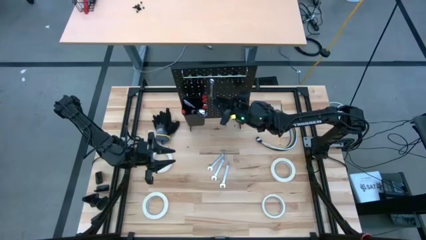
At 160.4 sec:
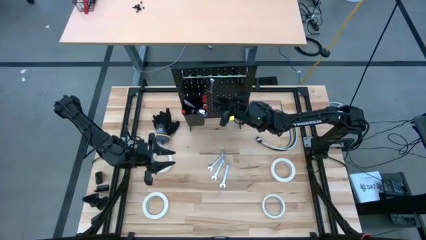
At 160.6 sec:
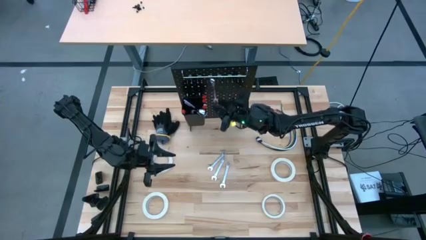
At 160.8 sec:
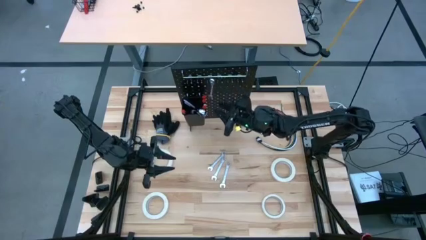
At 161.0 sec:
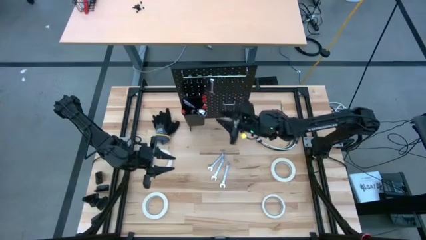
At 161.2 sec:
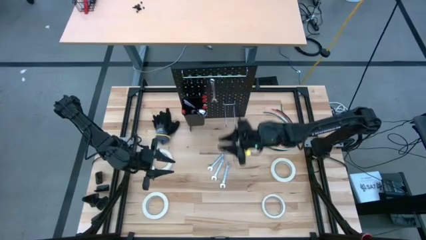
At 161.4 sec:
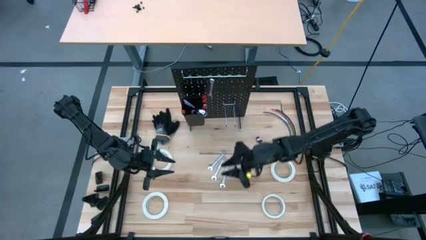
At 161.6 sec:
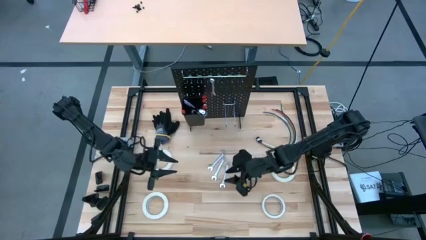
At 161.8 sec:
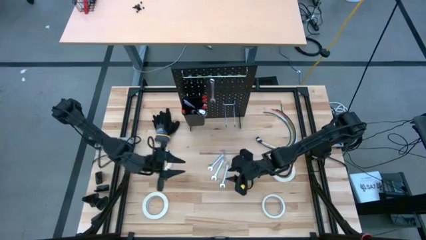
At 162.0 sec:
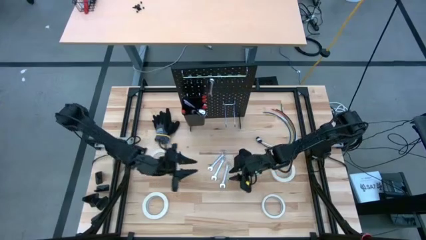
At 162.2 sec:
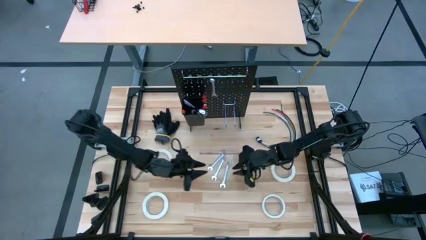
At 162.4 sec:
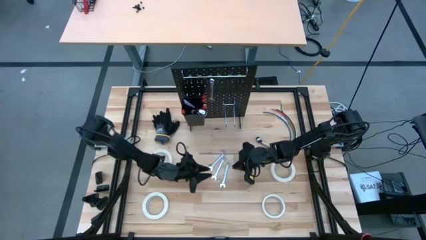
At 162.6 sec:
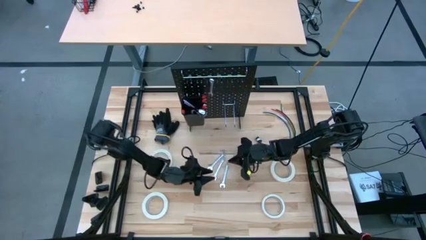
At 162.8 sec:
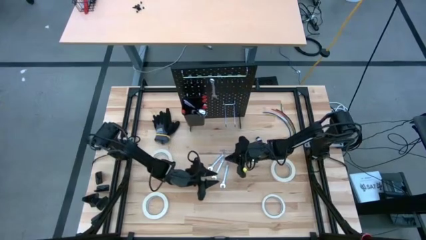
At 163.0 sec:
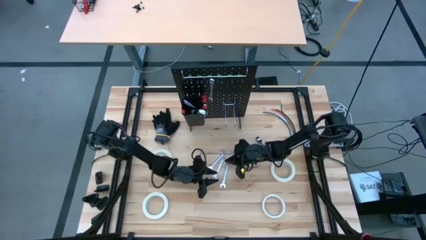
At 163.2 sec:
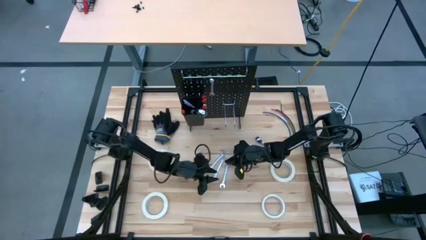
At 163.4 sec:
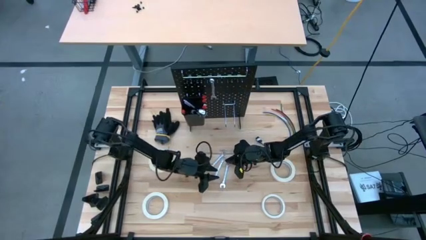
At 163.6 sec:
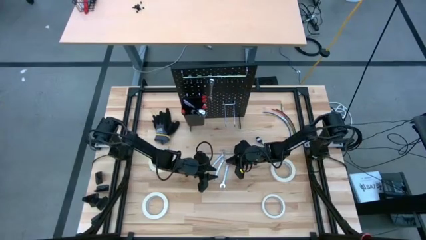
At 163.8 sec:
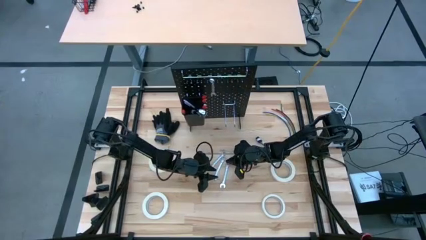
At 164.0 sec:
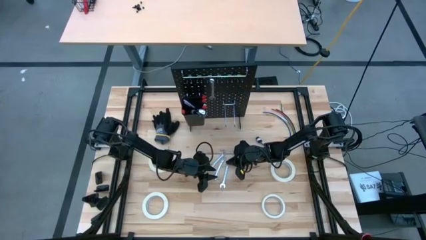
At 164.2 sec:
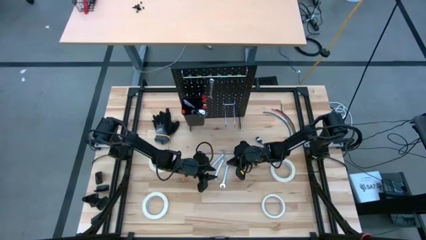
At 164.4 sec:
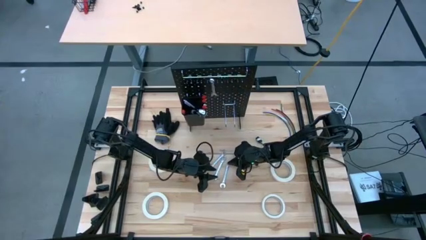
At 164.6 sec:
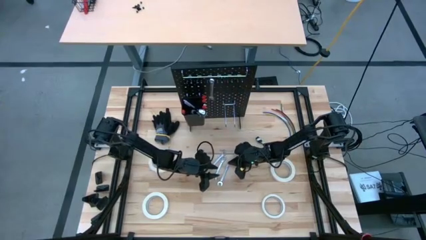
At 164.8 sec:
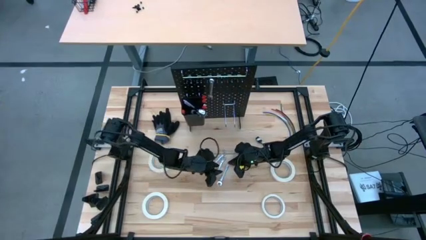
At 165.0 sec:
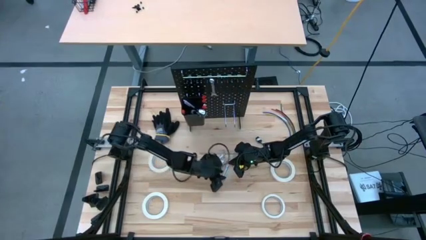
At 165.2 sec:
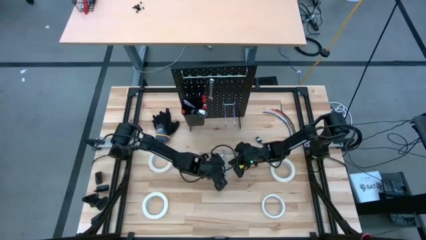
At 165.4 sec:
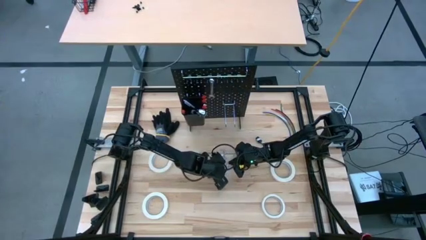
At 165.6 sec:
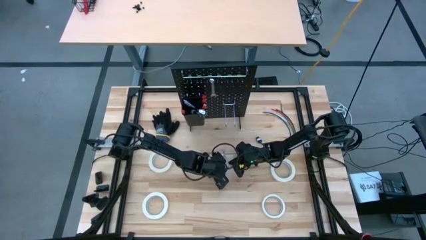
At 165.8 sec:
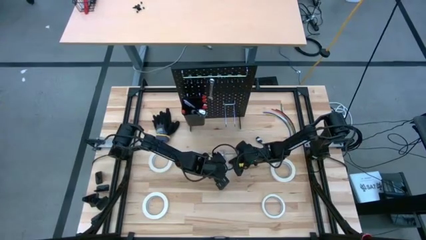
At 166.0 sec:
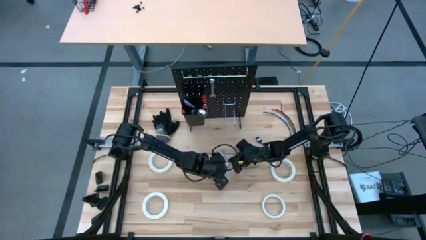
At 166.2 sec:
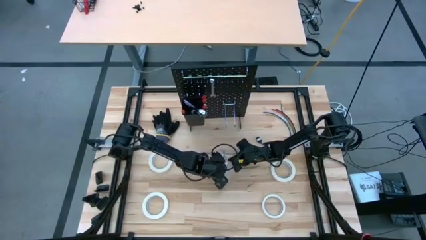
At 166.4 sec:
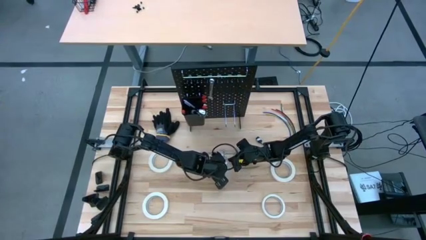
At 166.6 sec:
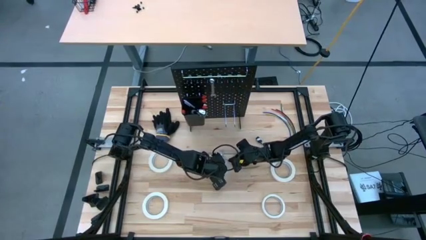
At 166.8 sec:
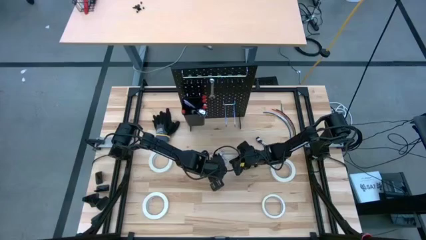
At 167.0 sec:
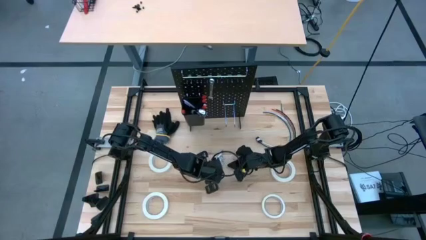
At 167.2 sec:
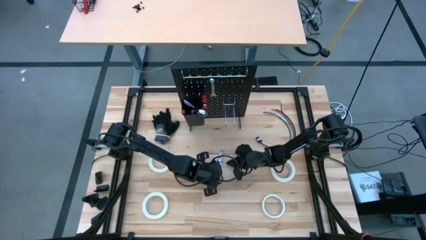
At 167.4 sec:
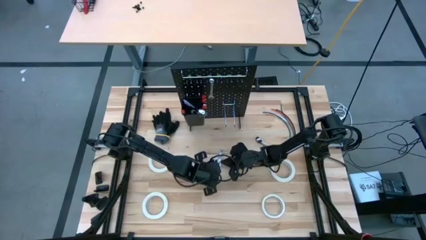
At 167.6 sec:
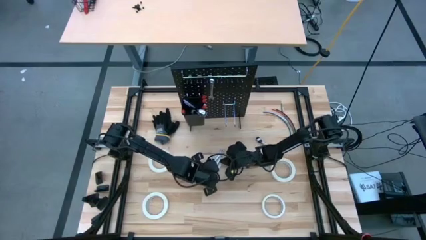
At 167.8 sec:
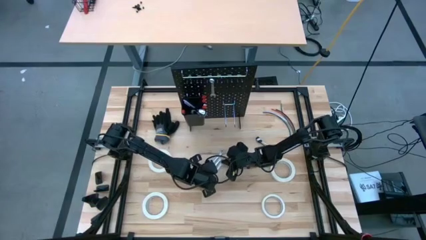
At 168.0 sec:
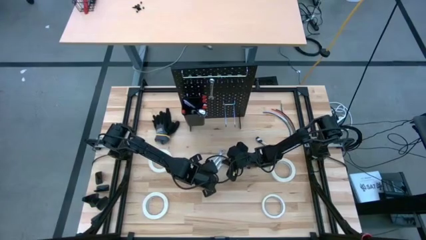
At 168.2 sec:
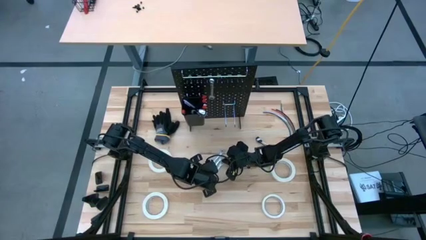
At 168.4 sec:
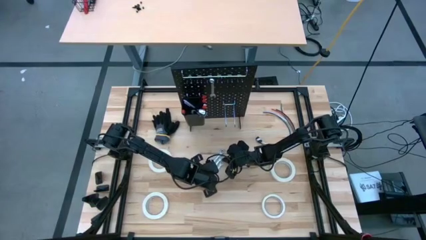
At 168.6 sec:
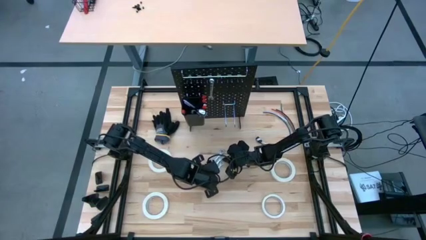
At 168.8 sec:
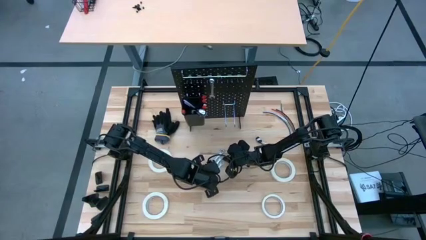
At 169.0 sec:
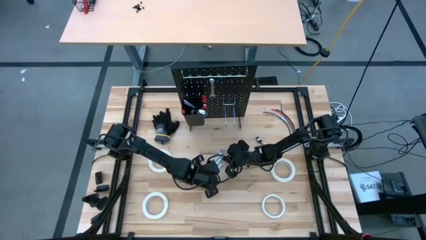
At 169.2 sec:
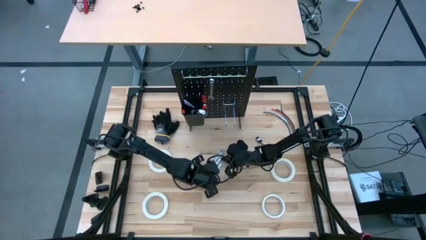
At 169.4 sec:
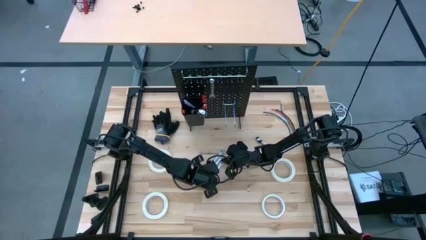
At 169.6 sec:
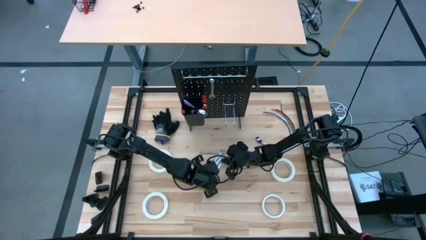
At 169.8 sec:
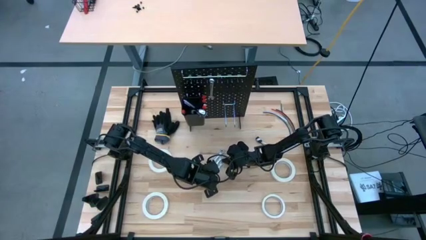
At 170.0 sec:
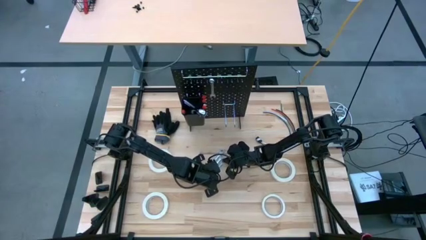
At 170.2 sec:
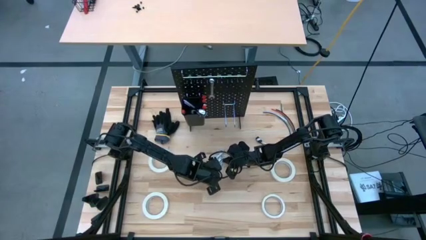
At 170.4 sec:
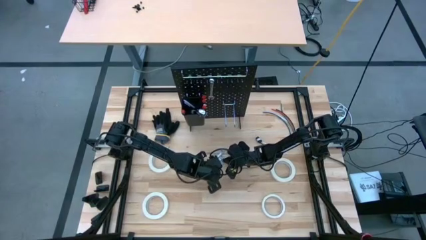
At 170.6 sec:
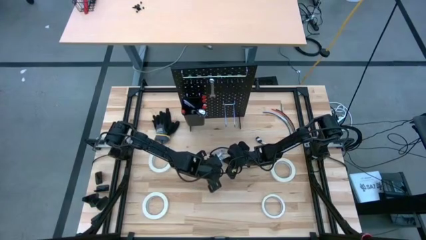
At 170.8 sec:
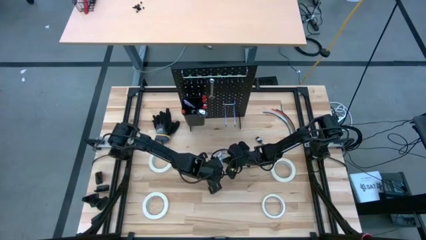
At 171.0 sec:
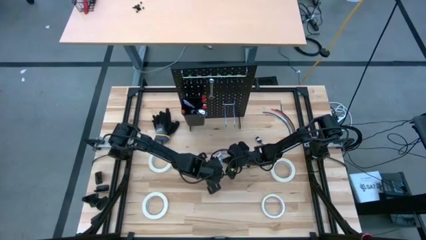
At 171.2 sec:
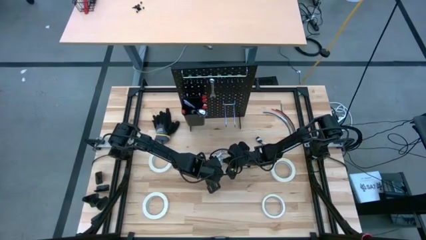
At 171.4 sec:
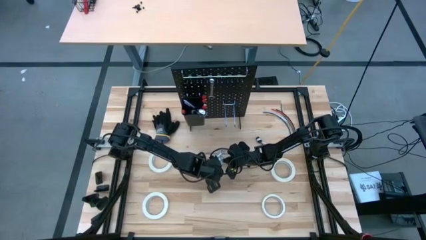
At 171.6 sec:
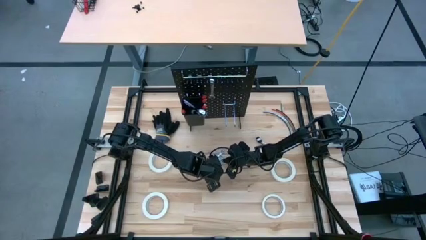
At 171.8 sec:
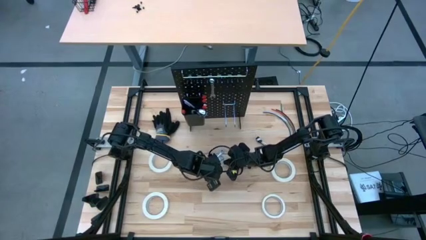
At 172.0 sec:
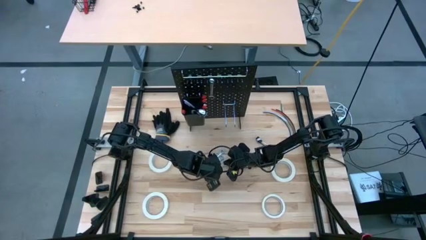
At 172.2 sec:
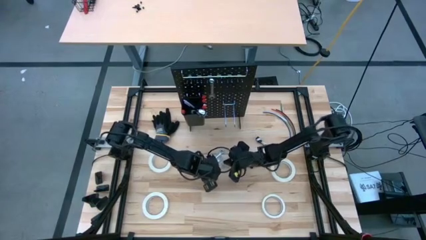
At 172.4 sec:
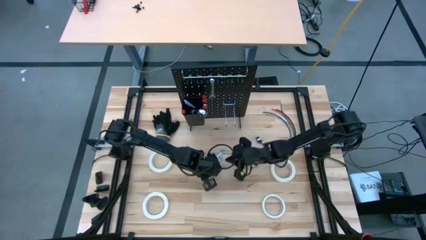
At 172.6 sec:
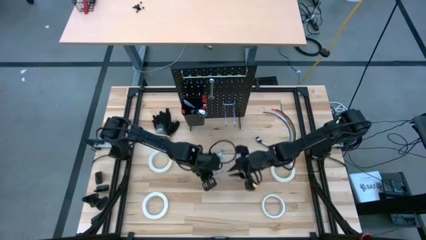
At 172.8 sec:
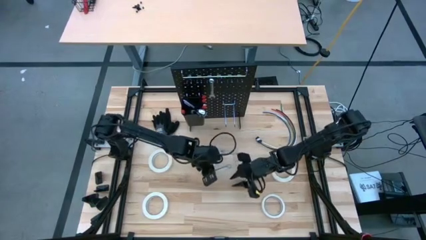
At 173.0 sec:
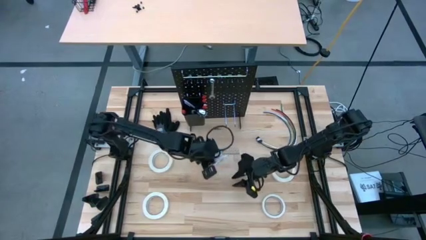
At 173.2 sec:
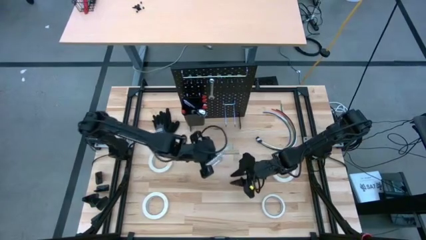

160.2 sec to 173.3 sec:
Task: Hang tools onto peg board
Hang the wrench on the peg board
